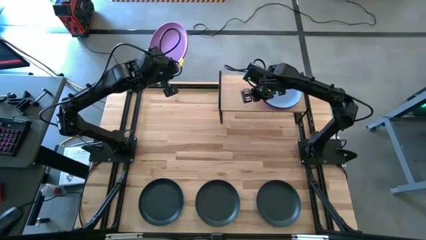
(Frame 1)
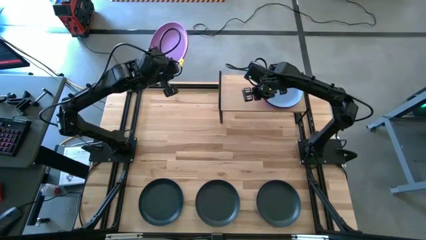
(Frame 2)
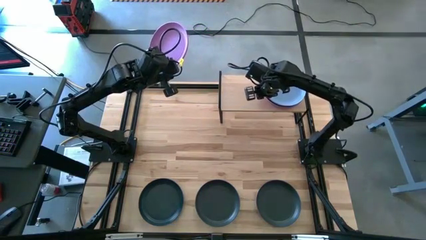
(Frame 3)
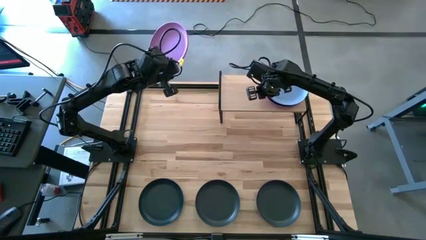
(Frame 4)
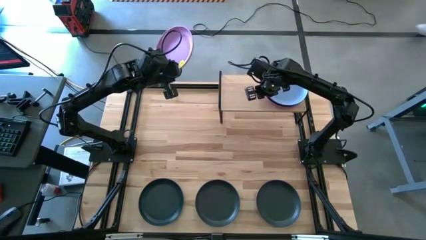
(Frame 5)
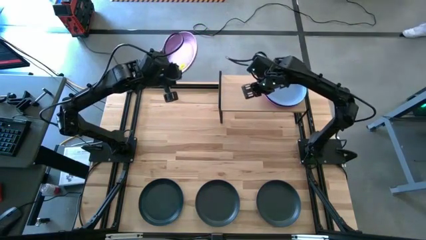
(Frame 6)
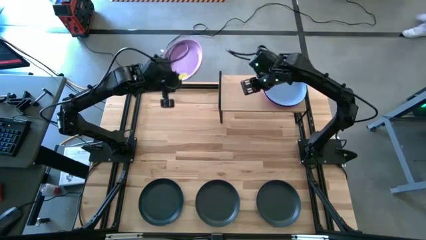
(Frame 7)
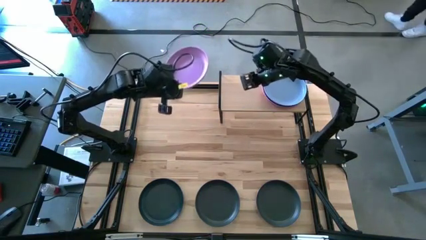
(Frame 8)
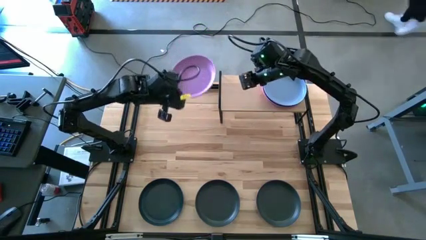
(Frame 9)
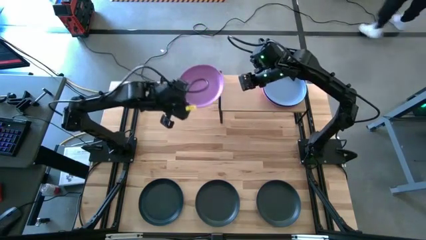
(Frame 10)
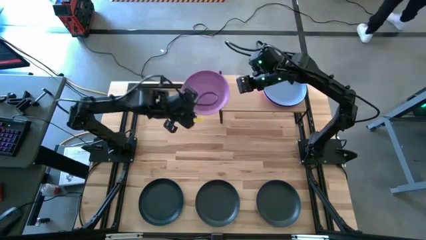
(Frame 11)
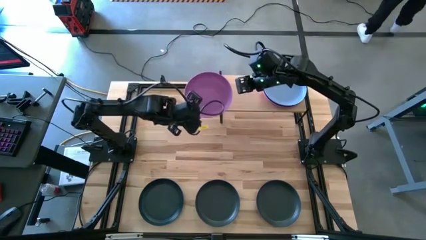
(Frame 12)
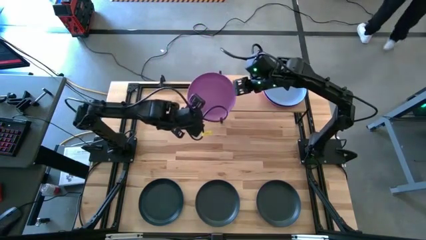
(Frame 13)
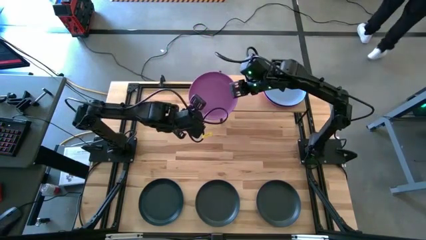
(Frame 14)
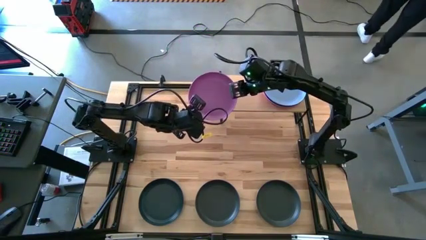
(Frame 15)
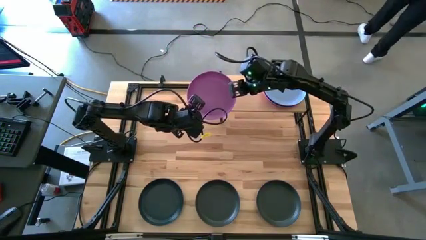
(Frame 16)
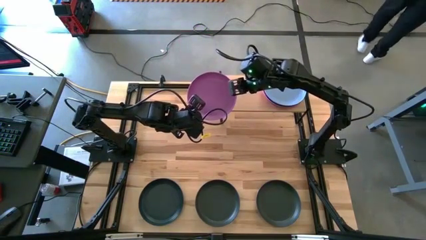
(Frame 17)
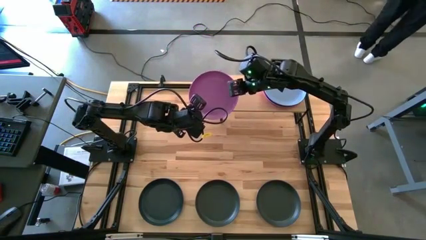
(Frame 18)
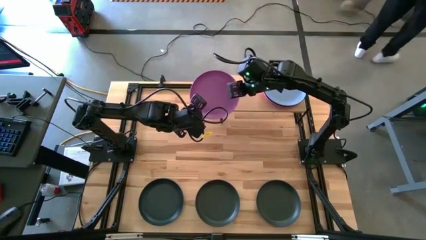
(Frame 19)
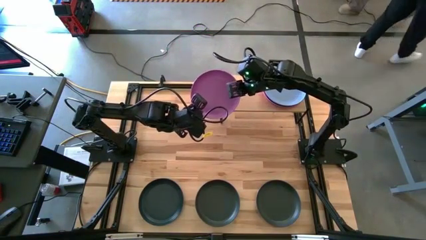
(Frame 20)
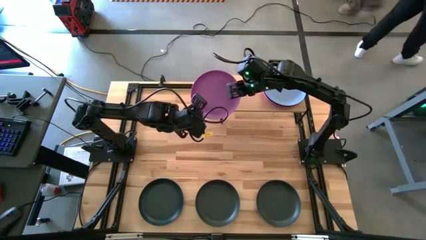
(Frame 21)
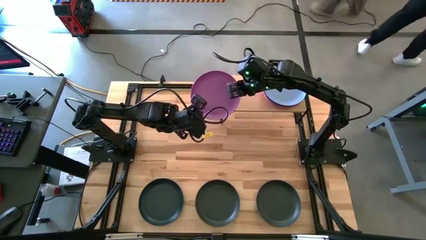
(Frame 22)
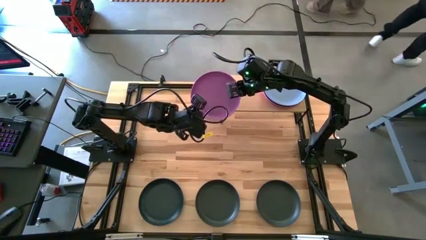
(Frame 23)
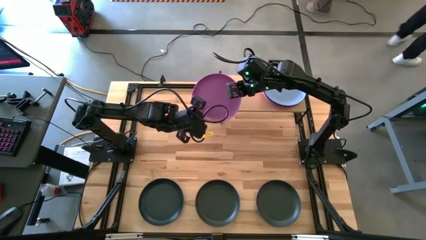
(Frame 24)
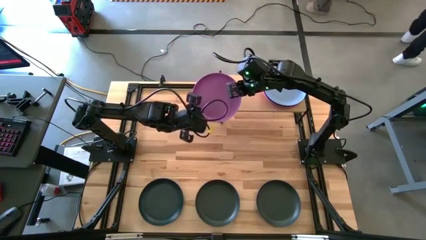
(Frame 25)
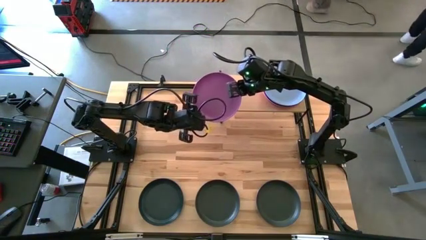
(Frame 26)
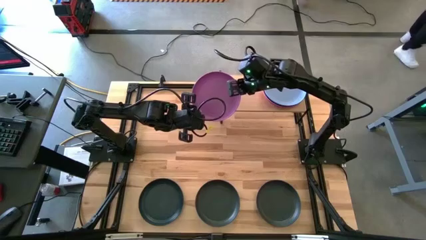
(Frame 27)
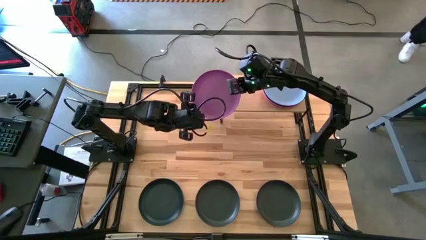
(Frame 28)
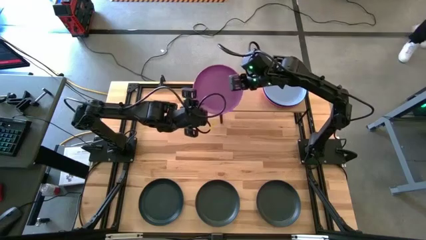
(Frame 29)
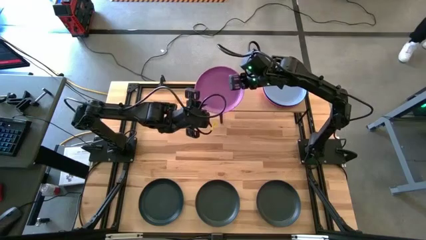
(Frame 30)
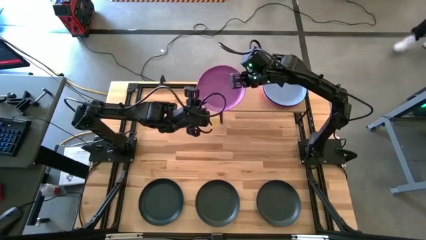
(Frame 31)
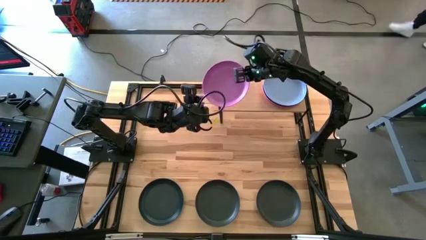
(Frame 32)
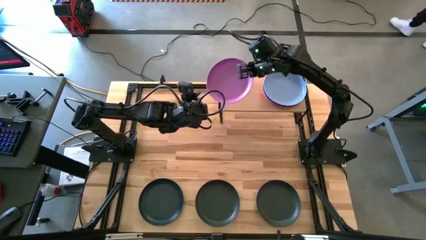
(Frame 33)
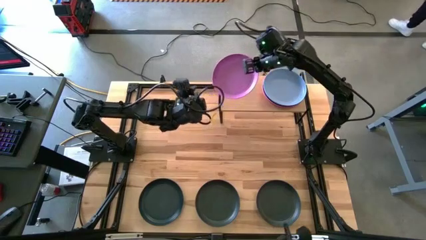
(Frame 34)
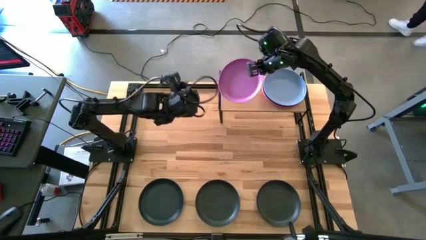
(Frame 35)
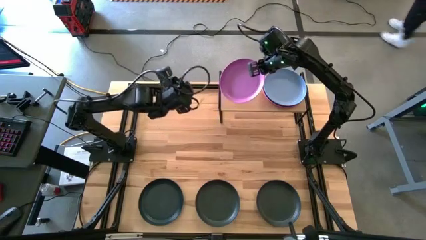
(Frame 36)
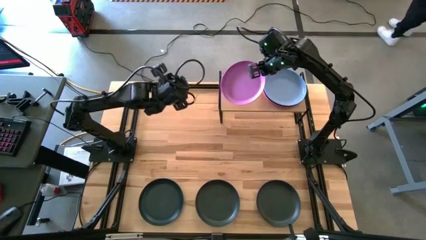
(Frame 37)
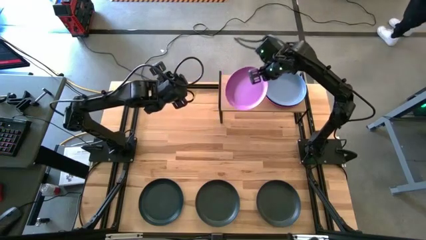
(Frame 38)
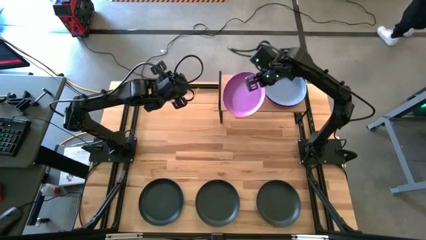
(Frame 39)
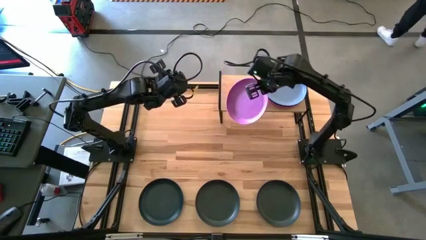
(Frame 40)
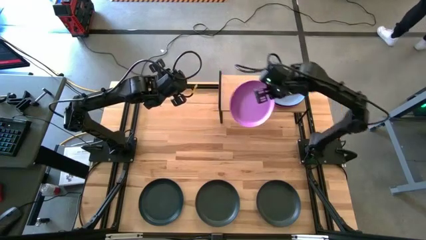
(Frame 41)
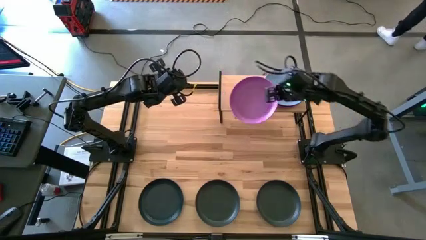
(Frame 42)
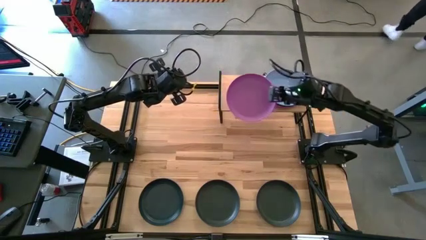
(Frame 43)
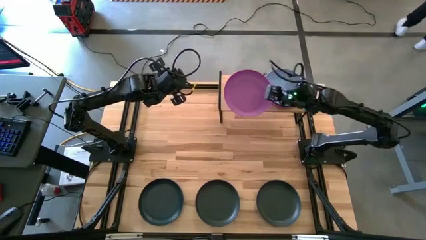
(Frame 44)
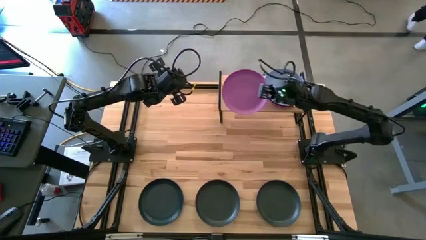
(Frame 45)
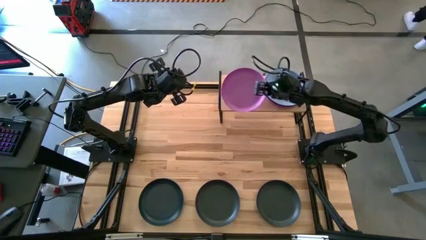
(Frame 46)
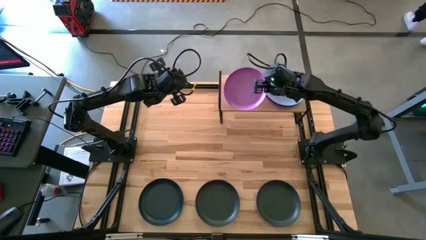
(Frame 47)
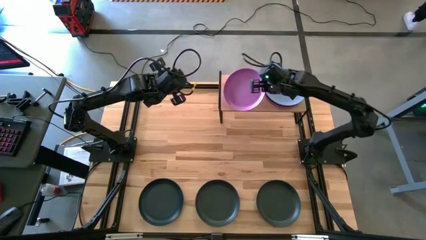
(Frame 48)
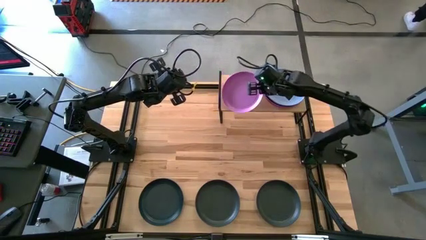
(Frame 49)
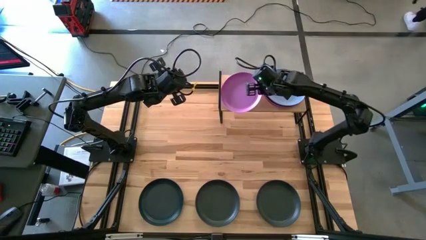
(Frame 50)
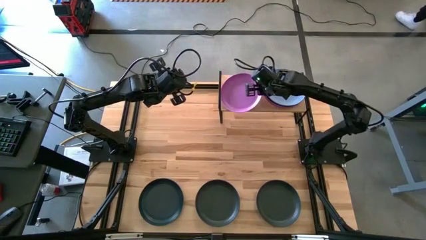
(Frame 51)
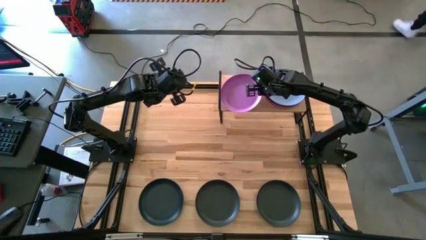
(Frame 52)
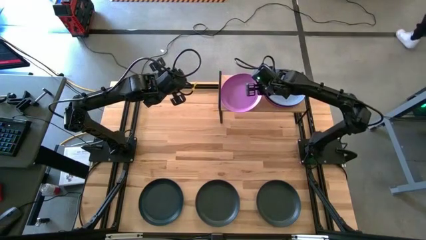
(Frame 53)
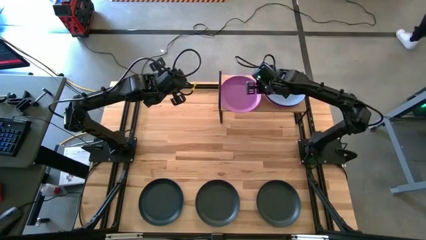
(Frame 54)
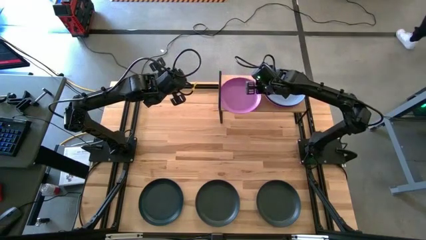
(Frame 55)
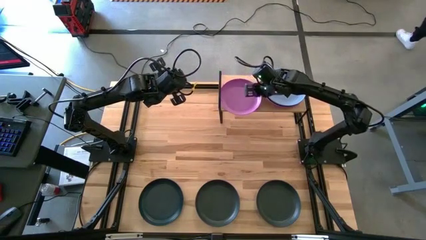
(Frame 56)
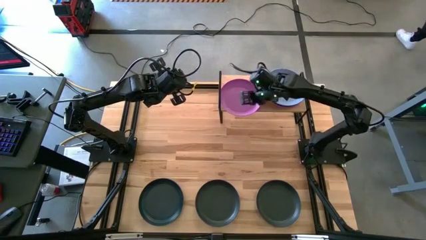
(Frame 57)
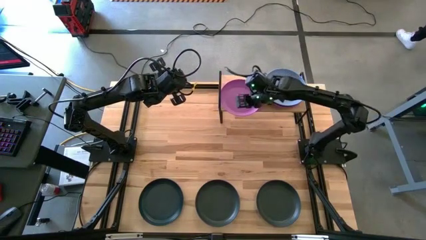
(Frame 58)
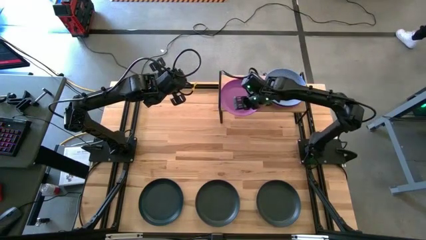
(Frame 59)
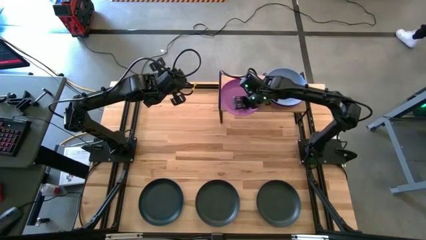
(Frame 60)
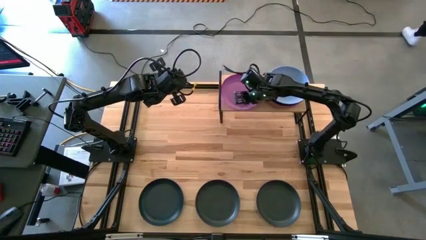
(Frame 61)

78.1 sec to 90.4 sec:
Task: Place and stack plates onto a shelf
Put the violet plate on the shelf

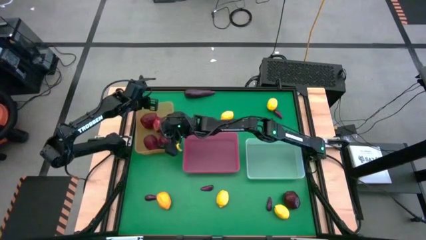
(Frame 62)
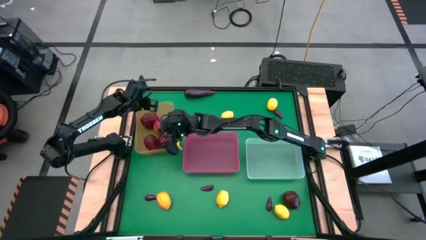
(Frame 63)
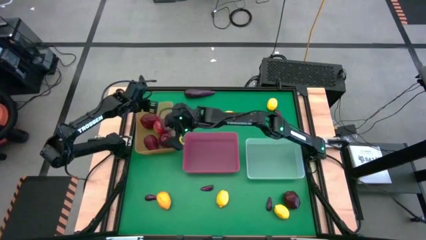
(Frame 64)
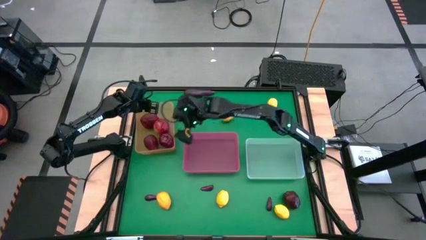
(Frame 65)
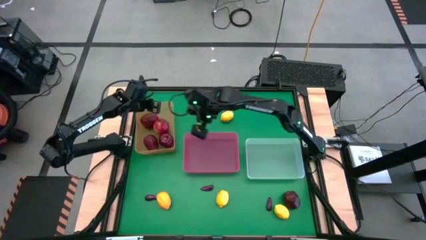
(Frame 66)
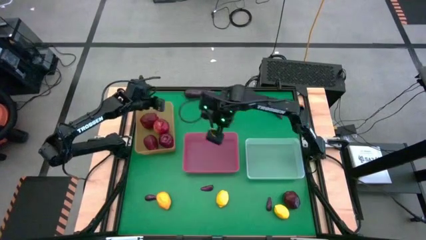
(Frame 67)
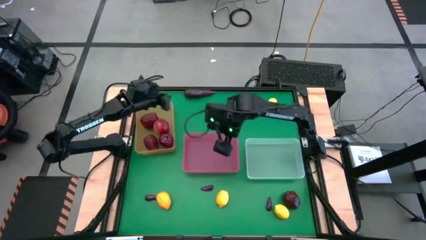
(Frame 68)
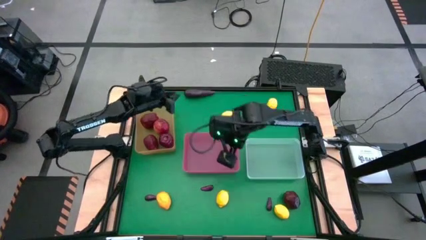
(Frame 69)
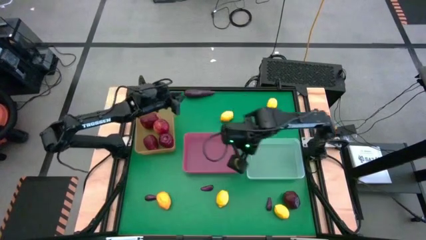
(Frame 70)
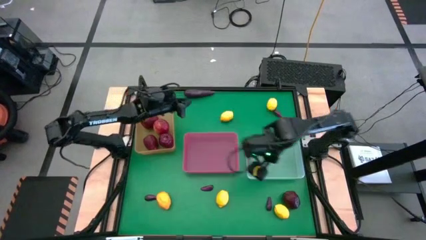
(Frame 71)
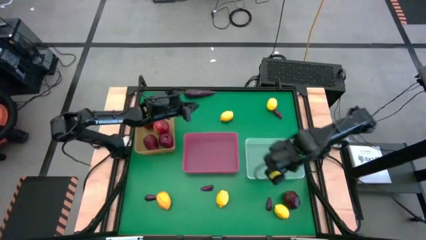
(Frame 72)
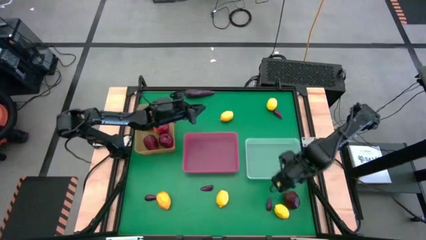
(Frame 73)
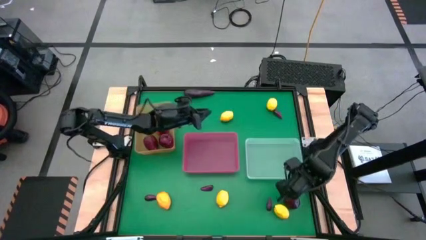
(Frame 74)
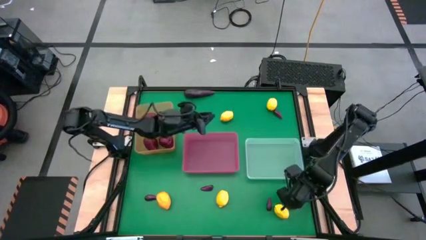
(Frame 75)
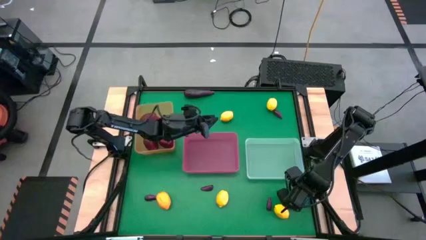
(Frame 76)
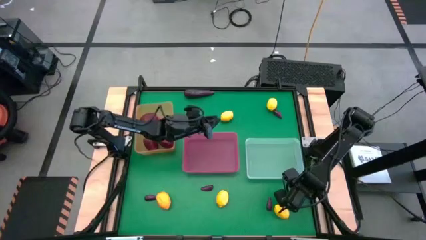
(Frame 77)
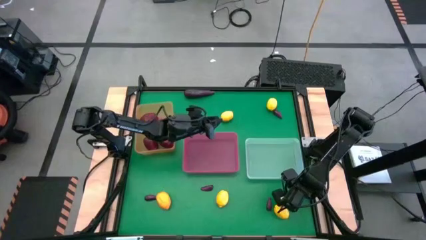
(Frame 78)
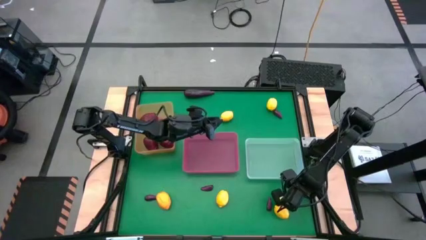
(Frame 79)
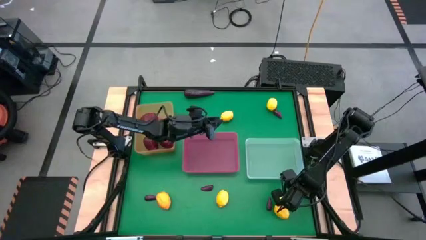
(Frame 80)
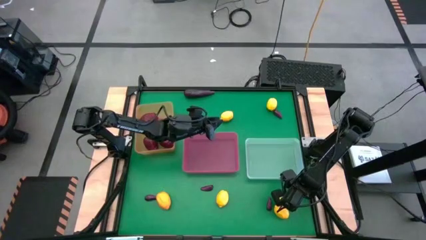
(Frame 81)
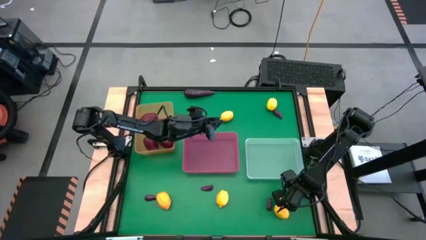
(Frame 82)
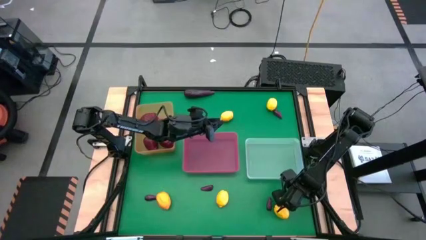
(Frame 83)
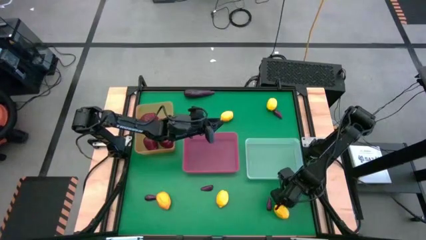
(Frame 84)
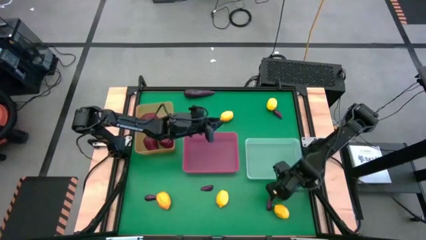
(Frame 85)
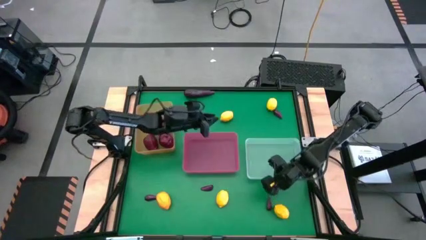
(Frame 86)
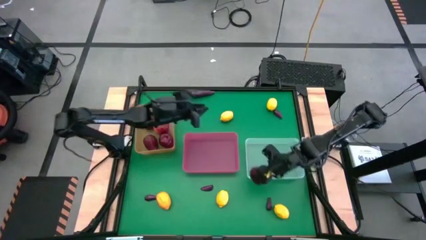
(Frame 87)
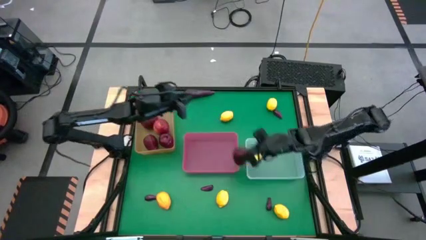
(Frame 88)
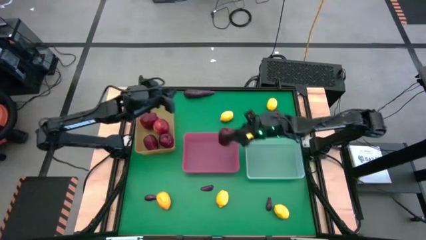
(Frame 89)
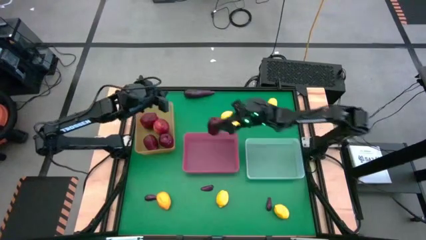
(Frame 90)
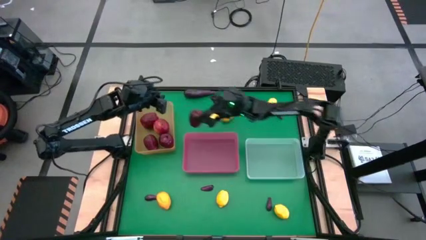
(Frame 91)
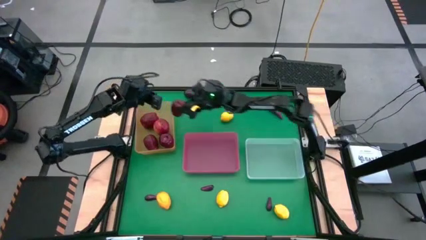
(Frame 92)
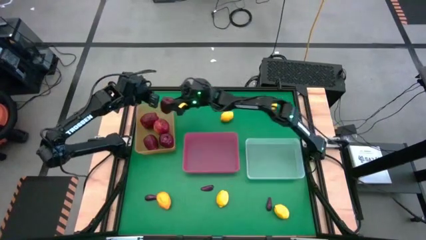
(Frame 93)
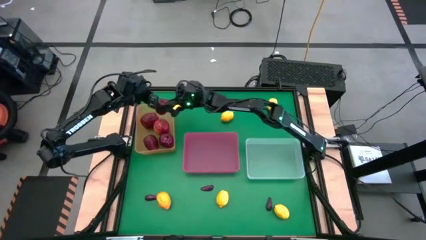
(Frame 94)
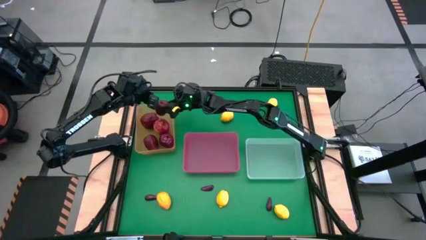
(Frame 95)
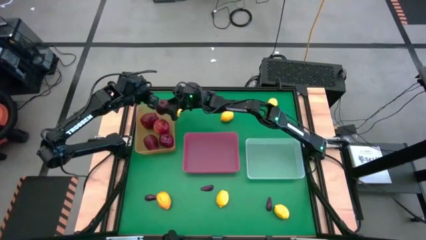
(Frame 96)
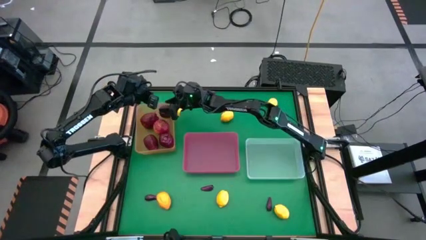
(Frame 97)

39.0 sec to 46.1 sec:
Task: Sort produce into baskets
Put the red apple into the orange bin
